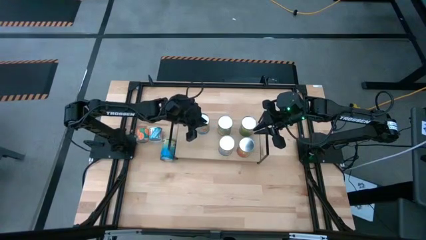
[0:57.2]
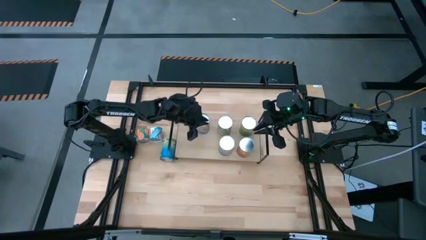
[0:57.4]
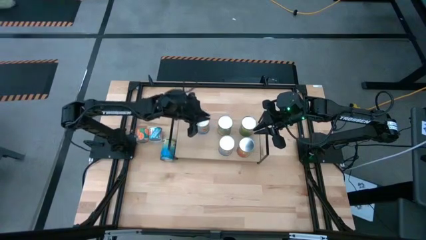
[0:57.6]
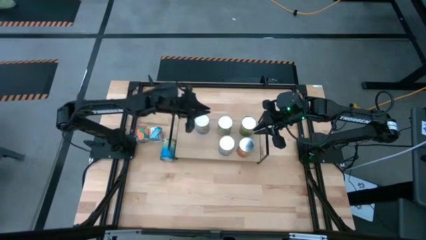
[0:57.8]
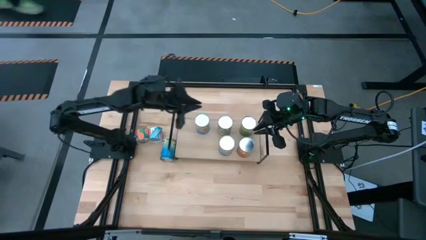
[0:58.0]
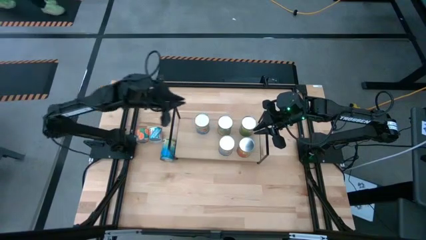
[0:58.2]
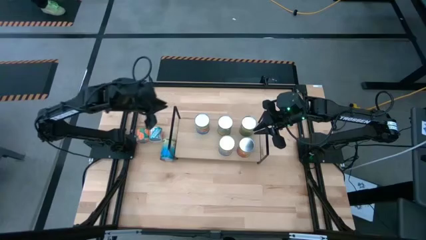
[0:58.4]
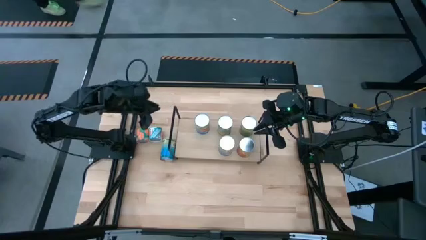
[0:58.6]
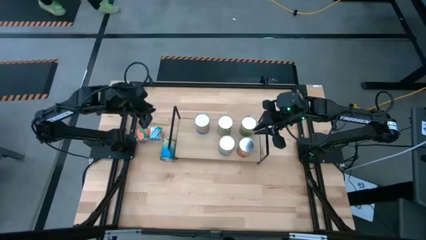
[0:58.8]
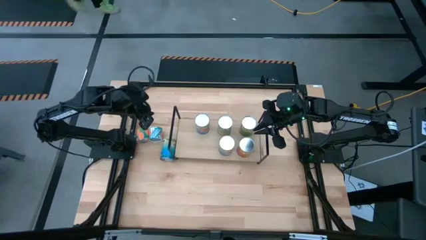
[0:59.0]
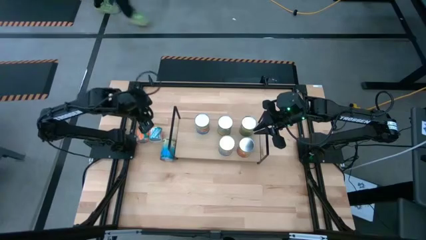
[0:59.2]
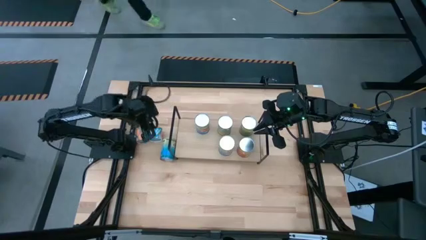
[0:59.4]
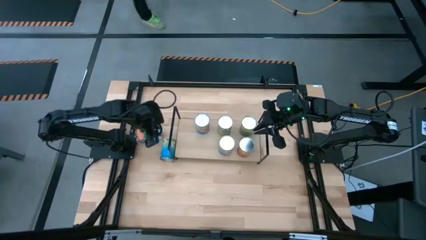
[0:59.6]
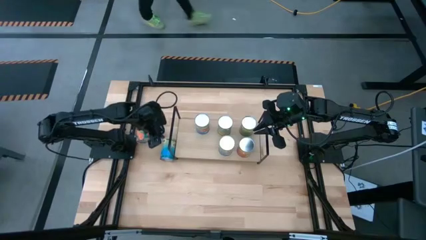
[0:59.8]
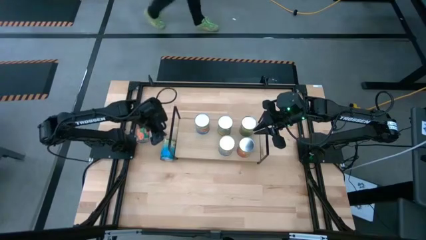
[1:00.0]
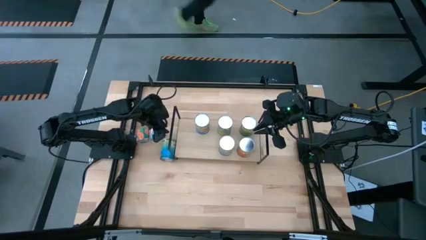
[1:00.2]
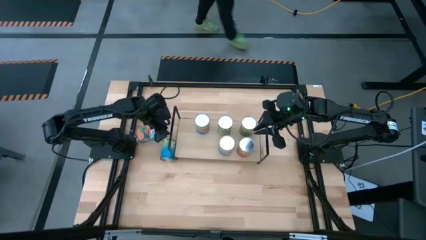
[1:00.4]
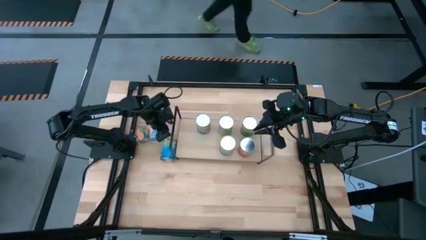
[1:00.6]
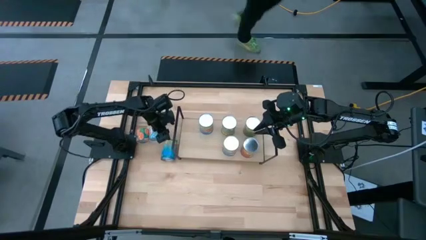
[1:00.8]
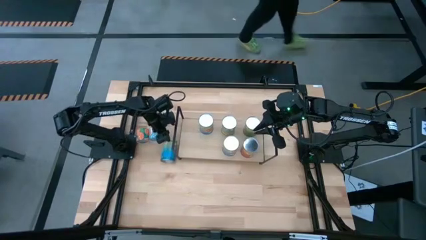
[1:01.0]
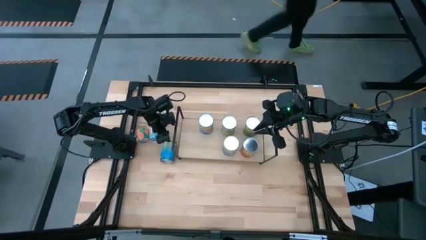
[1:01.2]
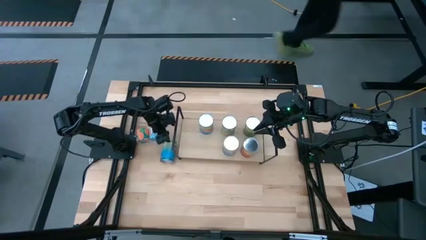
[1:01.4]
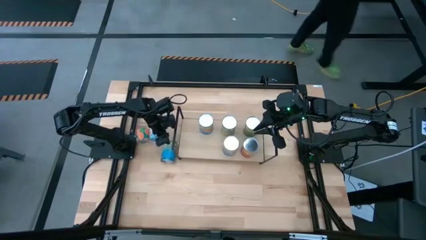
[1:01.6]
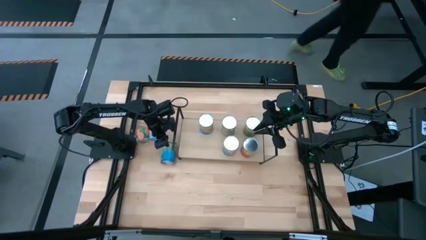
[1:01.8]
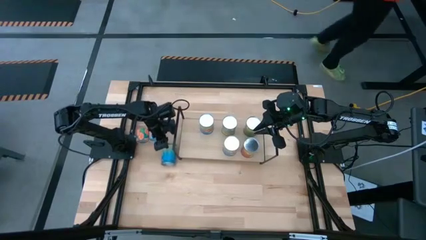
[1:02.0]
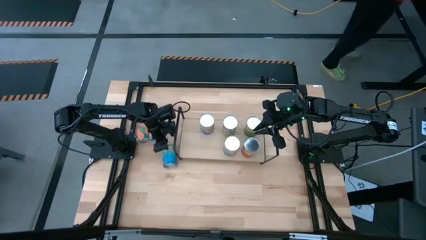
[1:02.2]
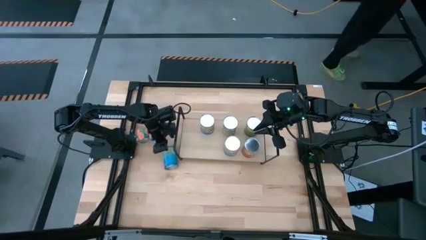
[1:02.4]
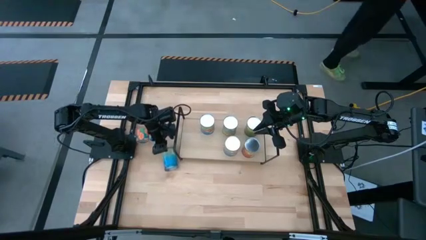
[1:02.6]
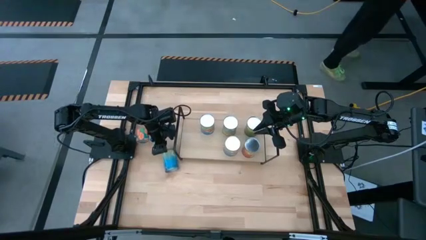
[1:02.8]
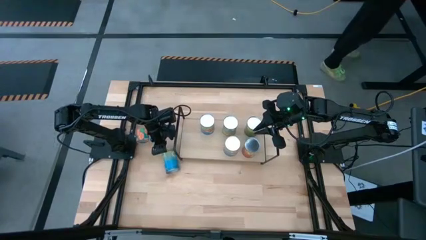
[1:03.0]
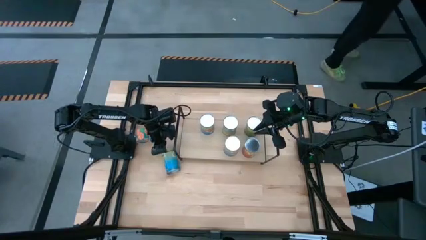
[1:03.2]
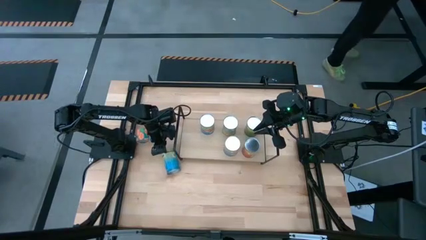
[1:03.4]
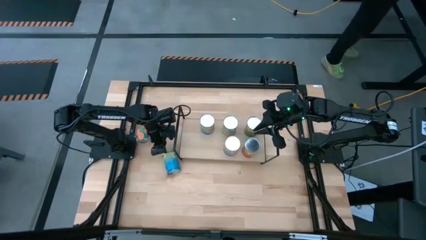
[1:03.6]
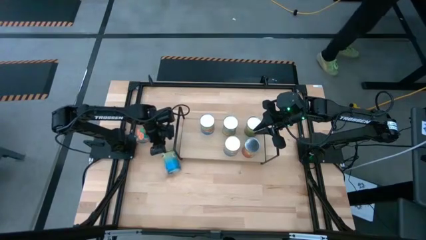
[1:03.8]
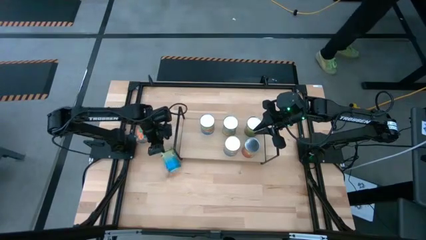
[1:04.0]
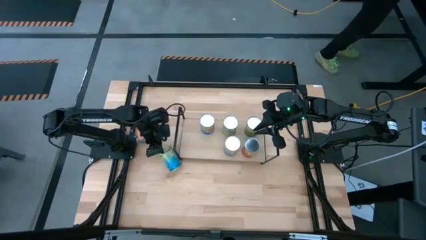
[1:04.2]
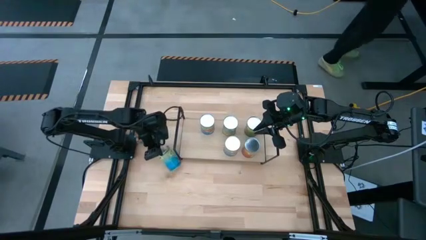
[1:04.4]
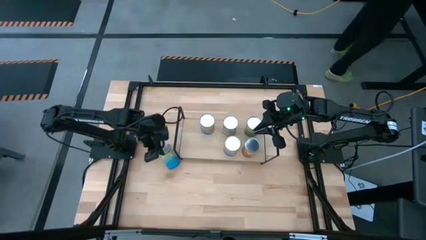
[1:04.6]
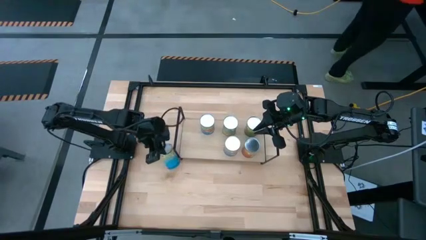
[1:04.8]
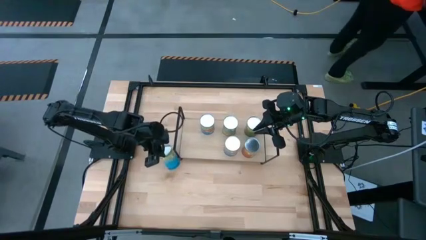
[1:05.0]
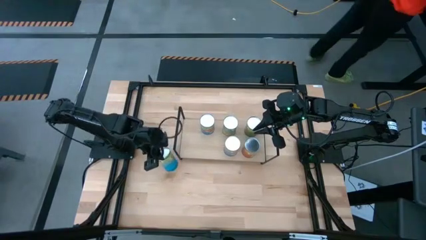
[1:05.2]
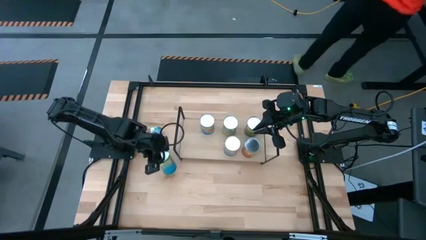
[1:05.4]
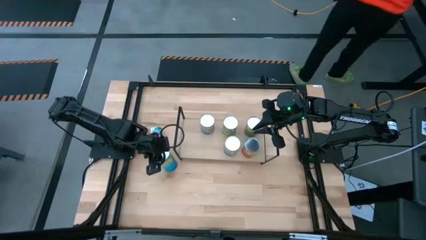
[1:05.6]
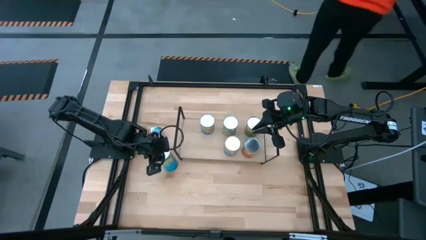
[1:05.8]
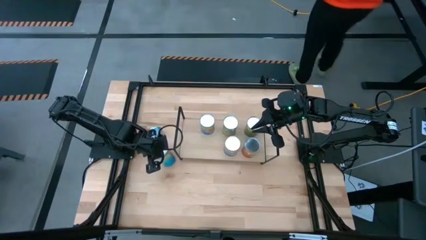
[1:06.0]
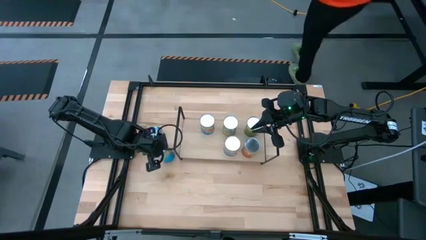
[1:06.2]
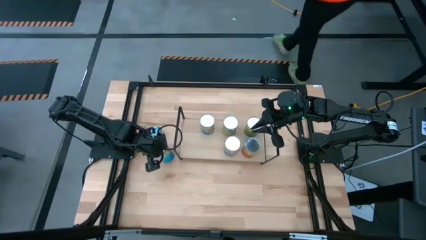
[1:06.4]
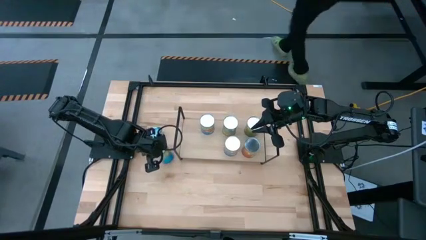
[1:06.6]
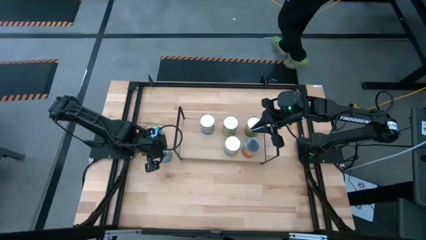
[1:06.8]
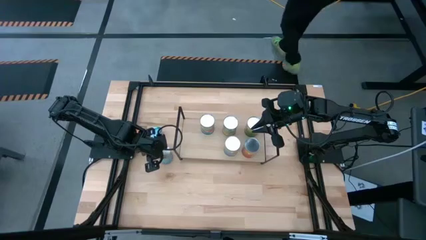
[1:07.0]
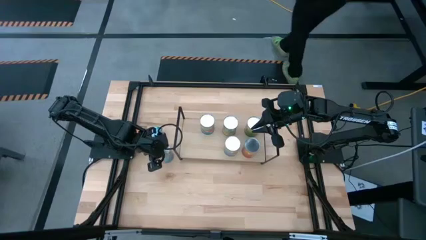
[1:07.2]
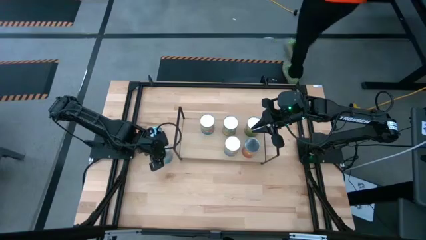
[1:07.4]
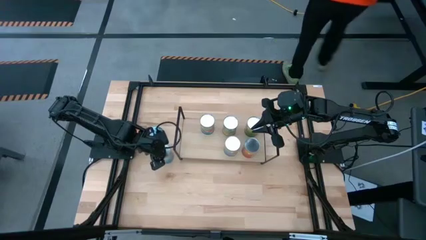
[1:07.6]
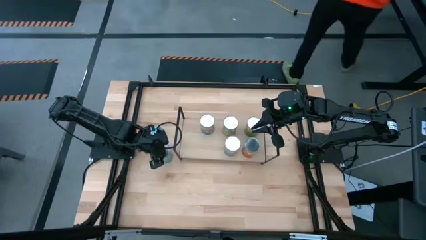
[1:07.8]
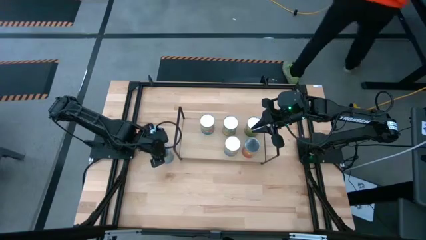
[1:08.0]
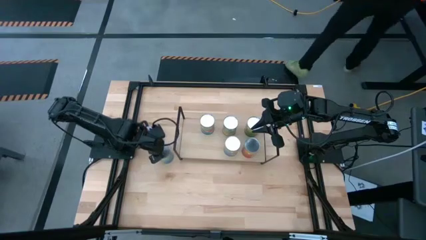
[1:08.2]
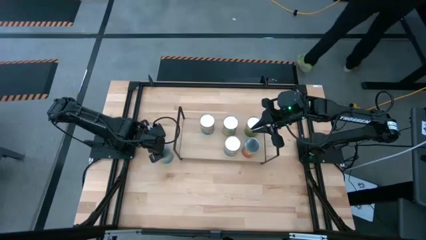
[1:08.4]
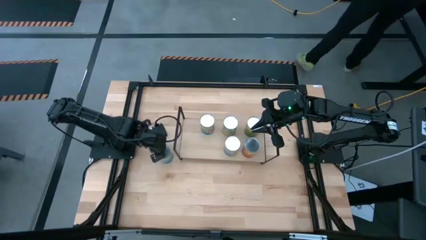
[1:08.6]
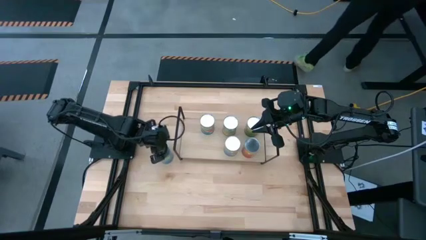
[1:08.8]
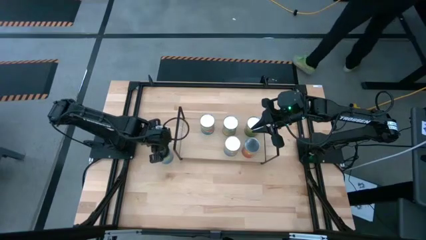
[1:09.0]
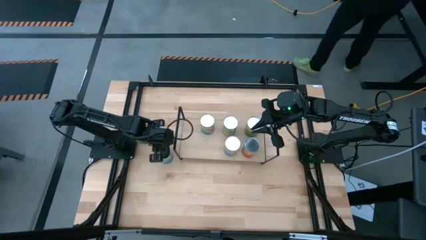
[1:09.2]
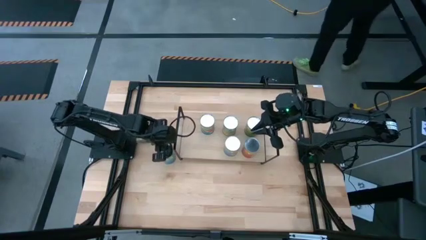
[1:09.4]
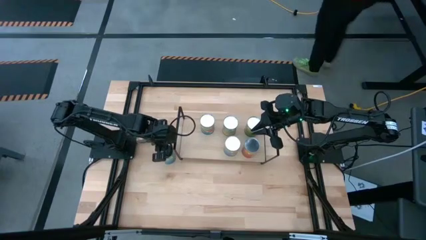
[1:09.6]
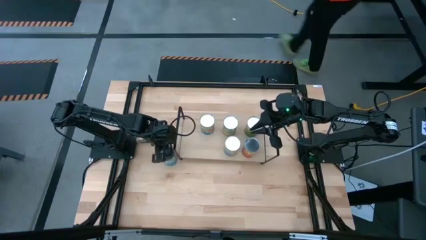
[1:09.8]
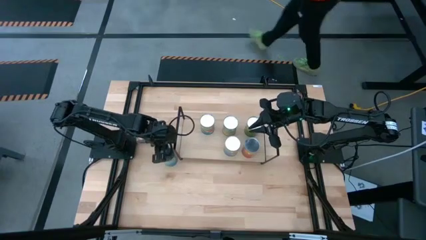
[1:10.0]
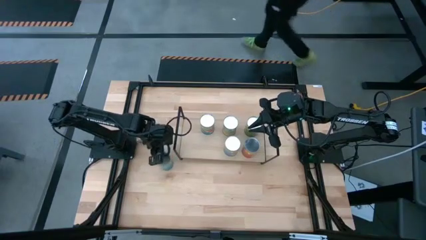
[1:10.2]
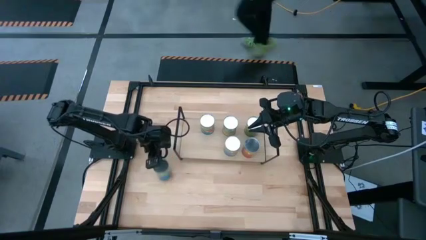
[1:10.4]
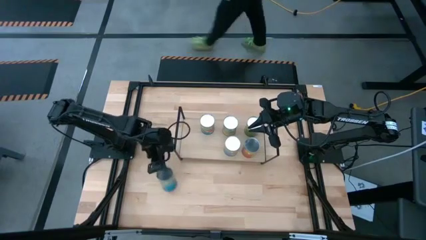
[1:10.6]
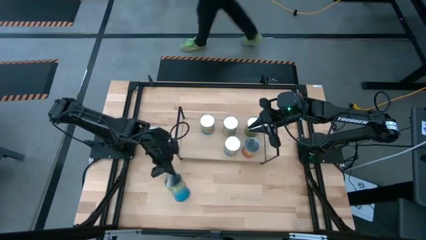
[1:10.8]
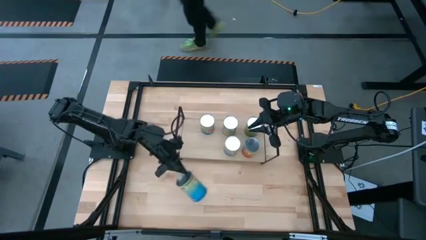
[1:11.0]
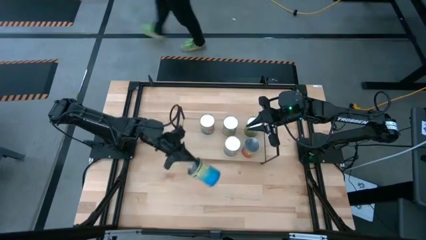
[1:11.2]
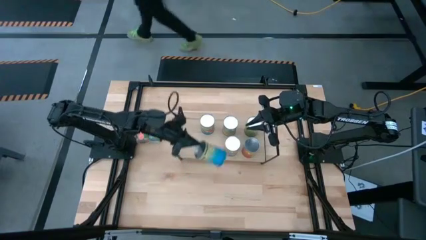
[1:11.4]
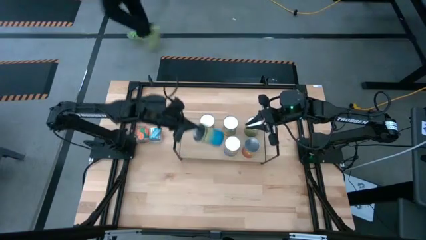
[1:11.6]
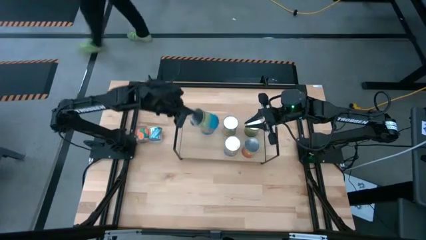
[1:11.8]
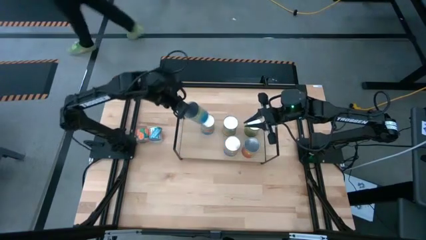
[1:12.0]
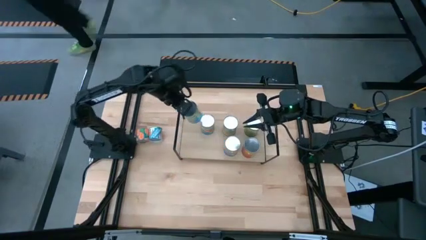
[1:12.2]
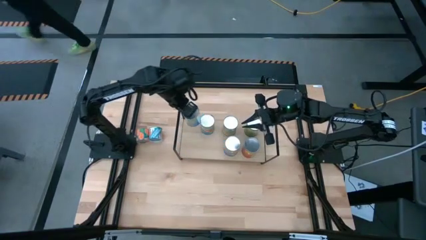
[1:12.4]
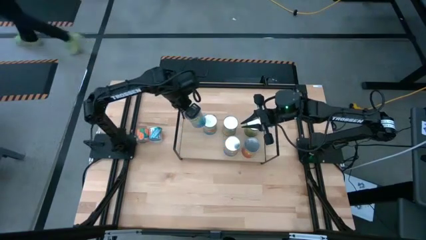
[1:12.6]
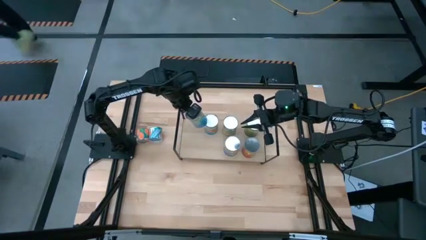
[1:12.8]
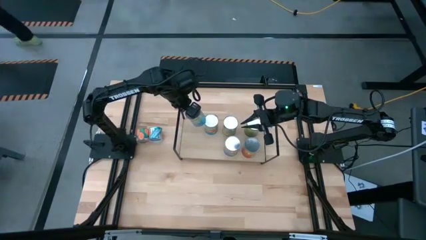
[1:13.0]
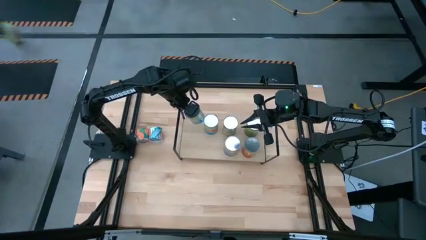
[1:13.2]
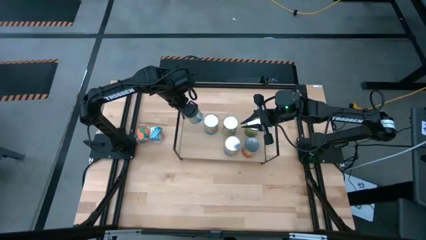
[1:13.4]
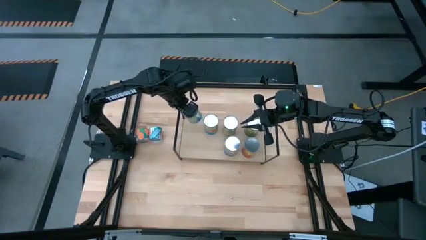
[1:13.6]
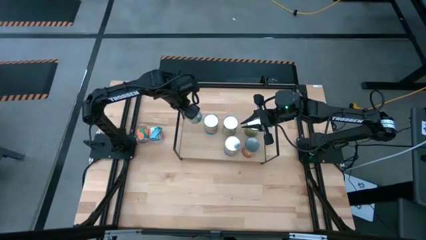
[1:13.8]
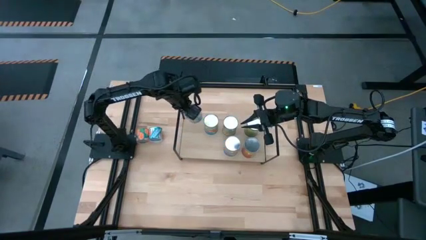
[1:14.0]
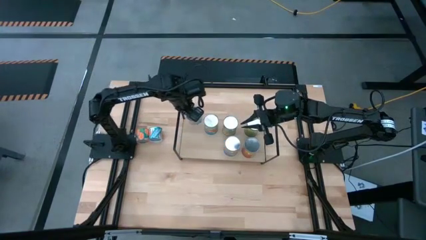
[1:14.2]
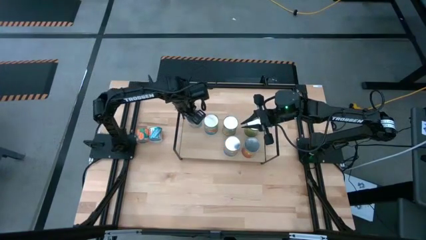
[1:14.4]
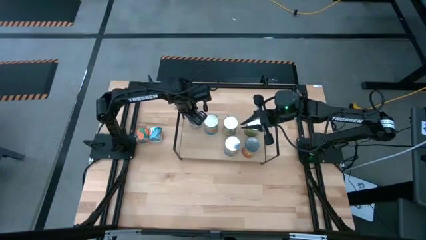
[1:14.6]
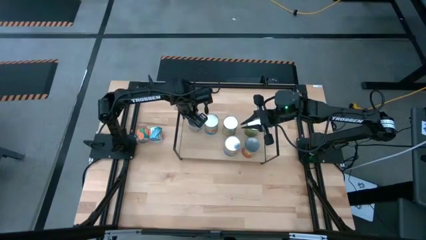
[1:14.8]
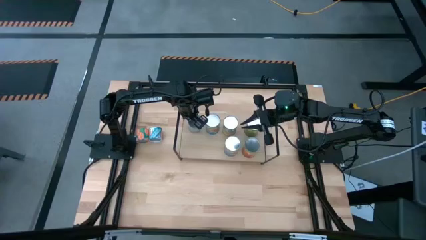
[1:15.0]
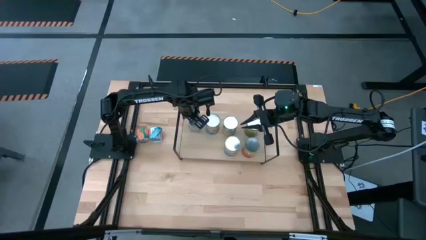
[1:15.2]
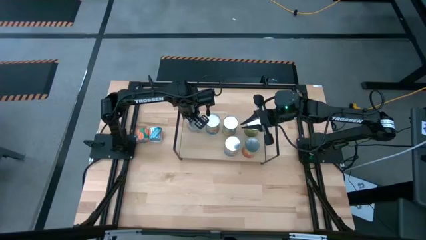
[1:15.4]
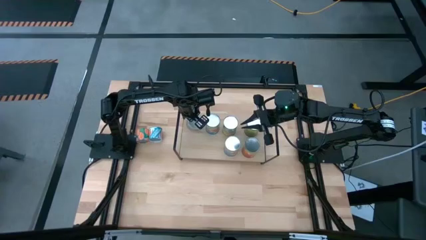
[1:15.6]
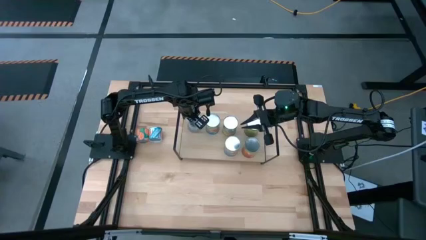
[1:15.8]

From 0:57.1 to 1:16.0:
Task: Pick and place cans onto a shelf
Put the canned cherries on the shelf
